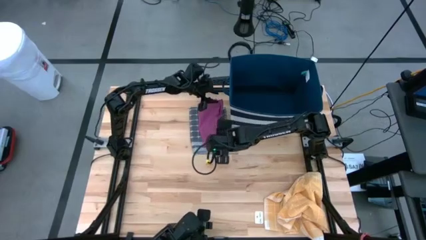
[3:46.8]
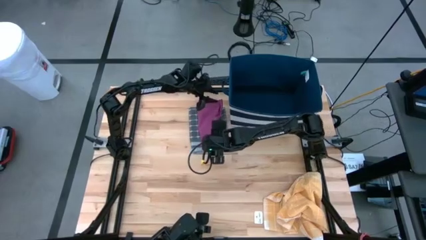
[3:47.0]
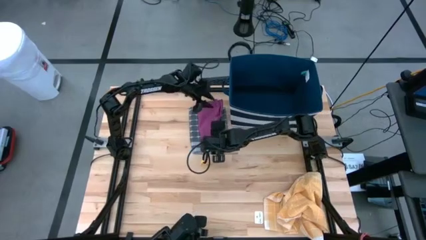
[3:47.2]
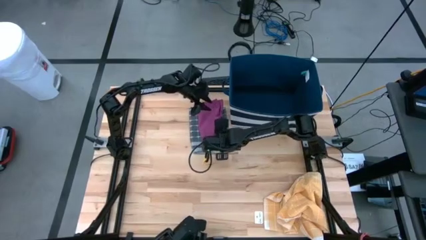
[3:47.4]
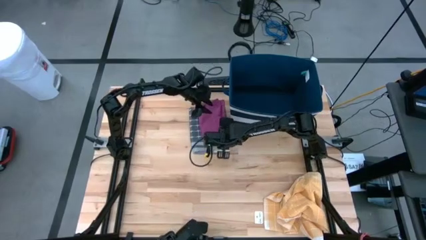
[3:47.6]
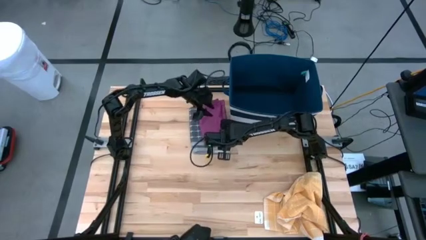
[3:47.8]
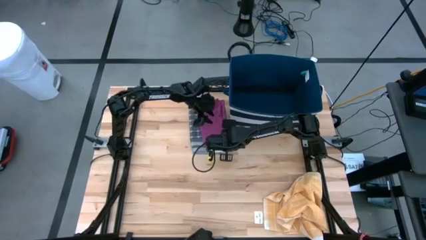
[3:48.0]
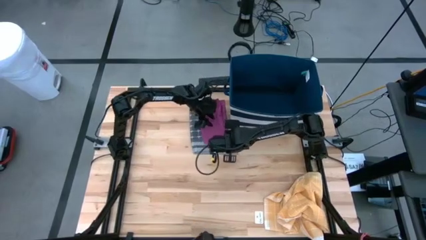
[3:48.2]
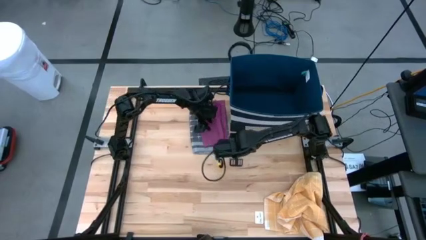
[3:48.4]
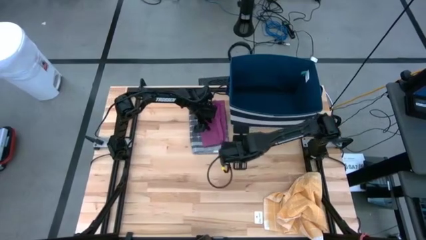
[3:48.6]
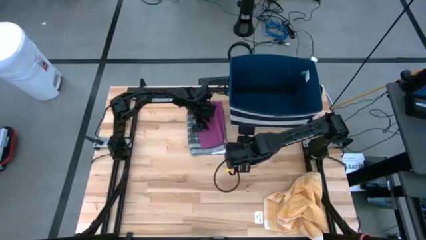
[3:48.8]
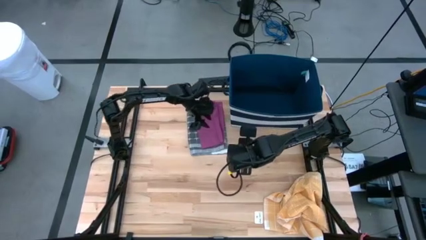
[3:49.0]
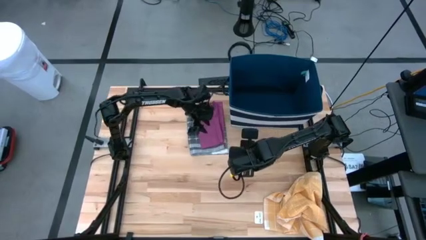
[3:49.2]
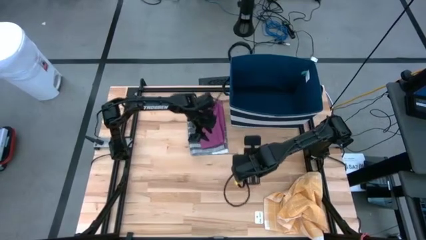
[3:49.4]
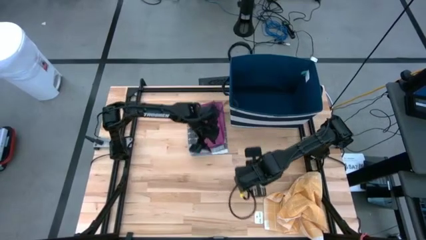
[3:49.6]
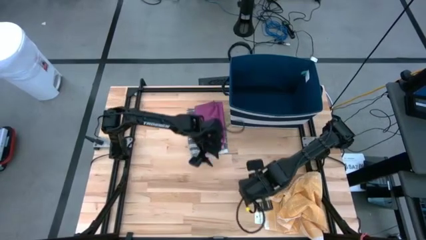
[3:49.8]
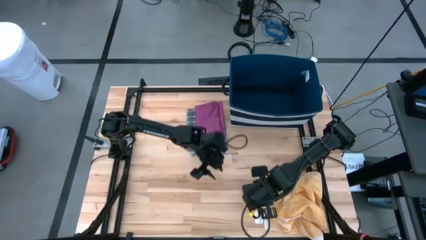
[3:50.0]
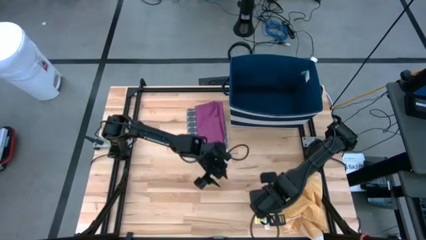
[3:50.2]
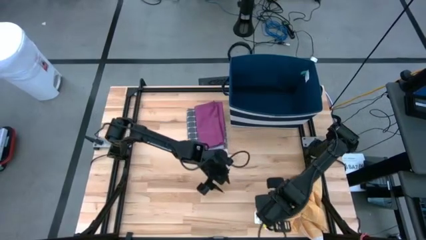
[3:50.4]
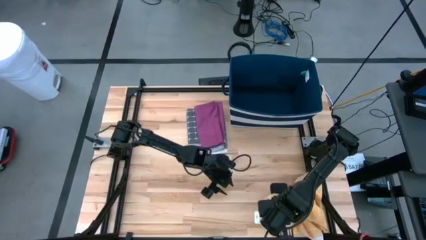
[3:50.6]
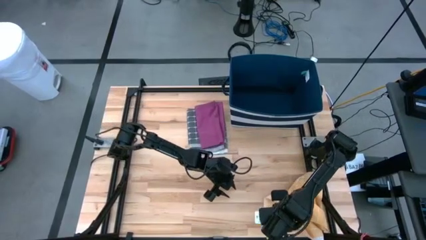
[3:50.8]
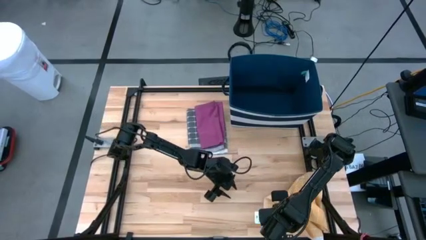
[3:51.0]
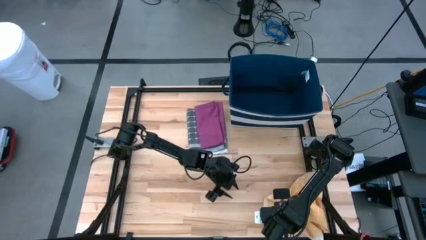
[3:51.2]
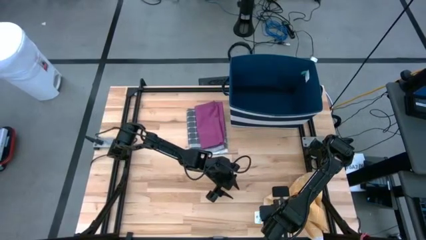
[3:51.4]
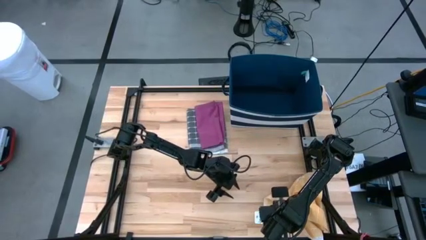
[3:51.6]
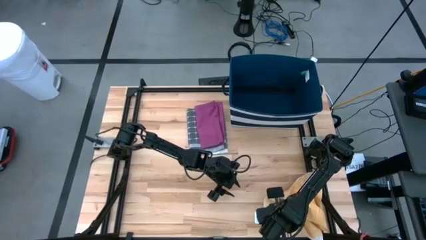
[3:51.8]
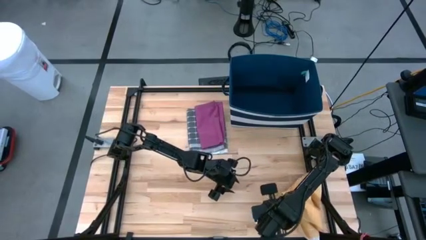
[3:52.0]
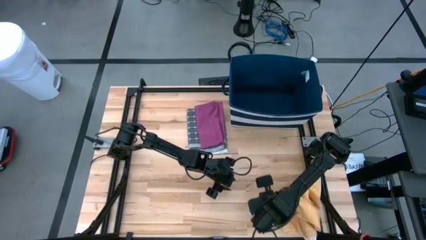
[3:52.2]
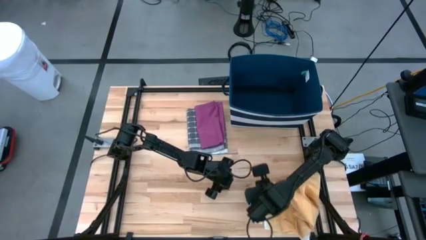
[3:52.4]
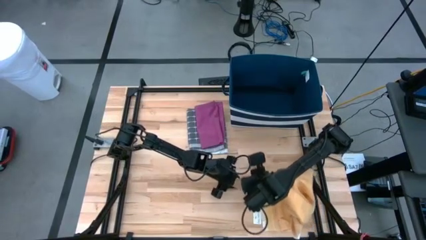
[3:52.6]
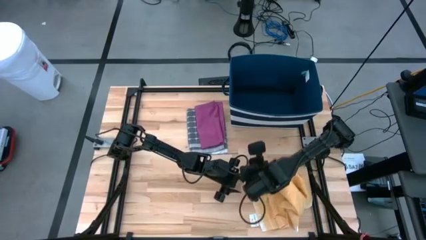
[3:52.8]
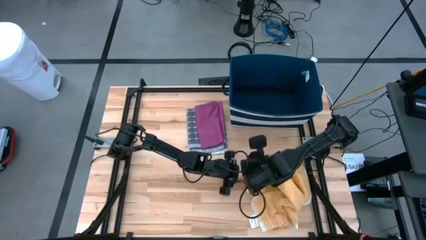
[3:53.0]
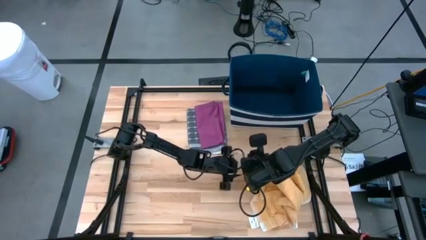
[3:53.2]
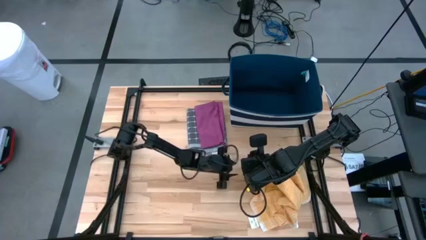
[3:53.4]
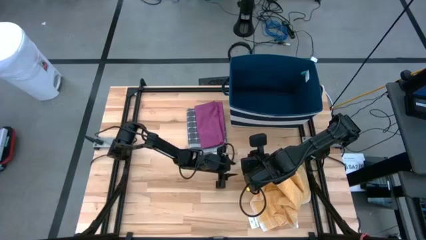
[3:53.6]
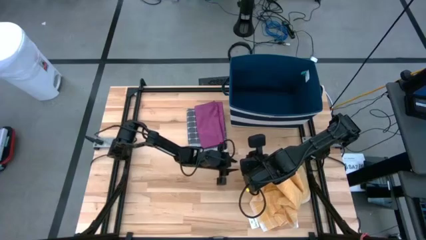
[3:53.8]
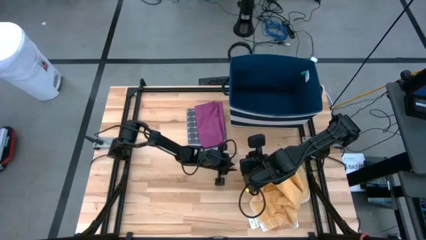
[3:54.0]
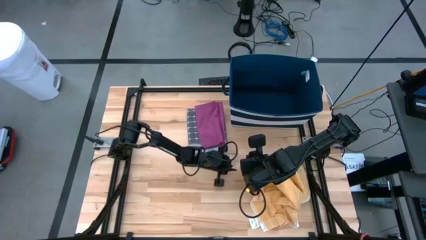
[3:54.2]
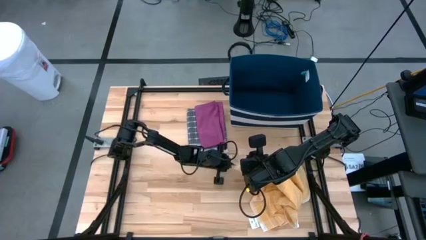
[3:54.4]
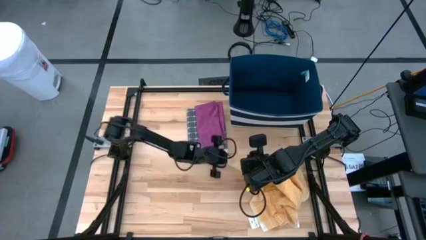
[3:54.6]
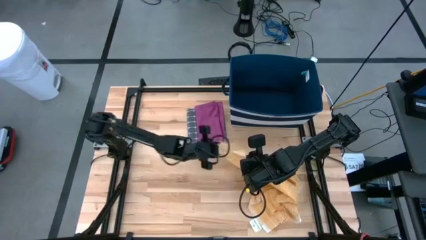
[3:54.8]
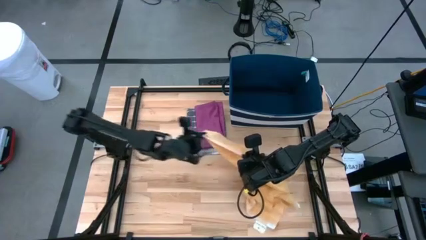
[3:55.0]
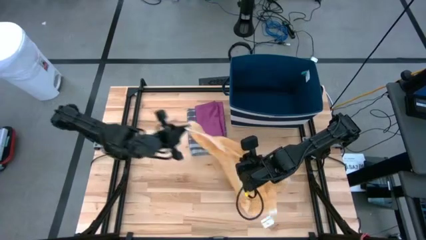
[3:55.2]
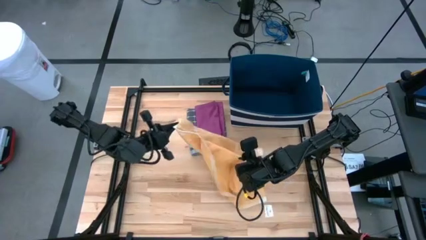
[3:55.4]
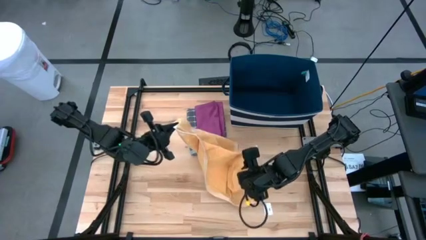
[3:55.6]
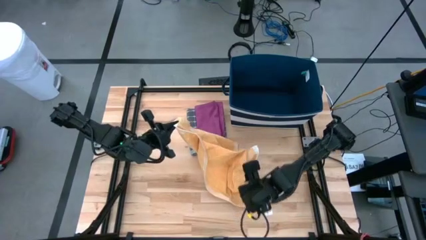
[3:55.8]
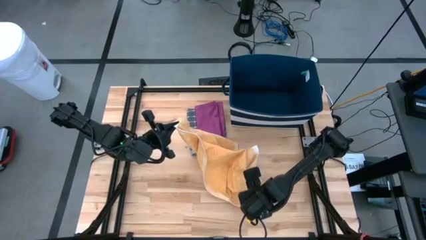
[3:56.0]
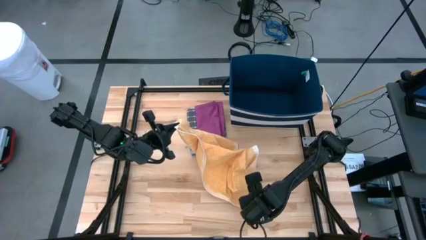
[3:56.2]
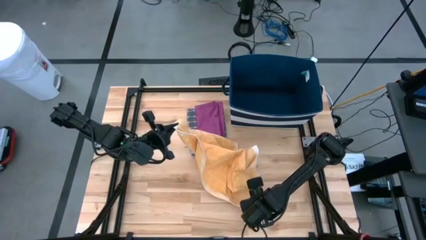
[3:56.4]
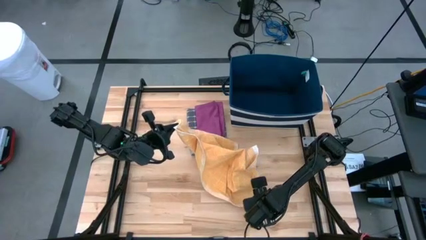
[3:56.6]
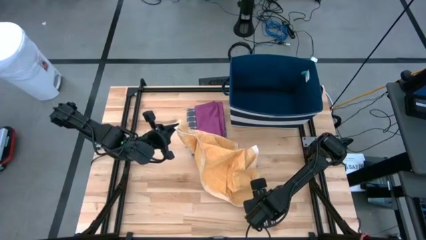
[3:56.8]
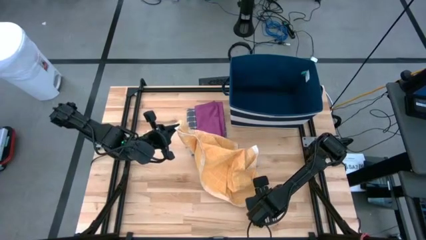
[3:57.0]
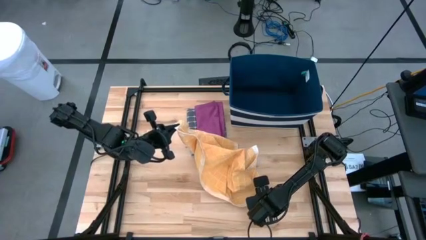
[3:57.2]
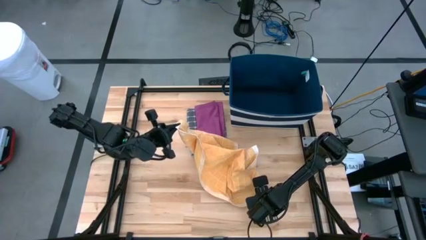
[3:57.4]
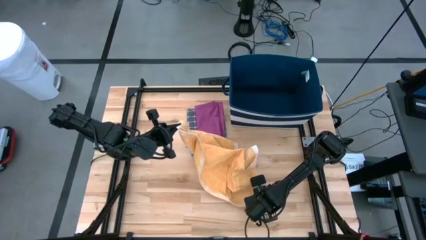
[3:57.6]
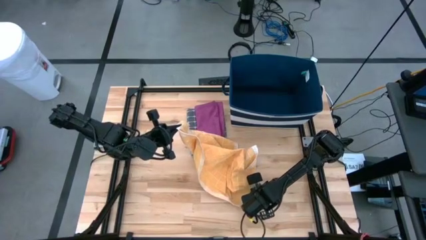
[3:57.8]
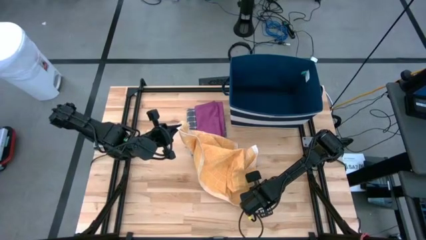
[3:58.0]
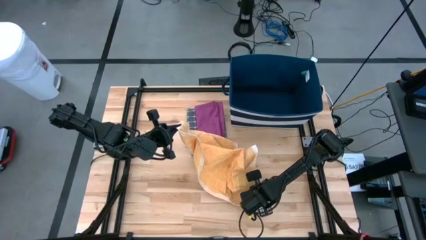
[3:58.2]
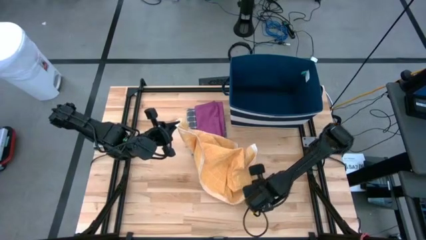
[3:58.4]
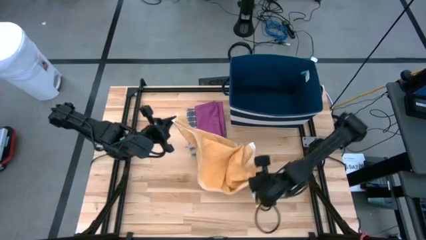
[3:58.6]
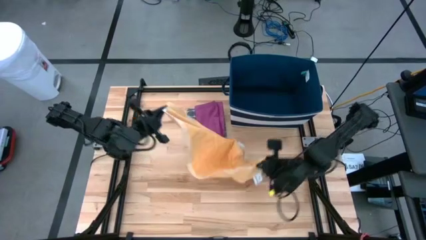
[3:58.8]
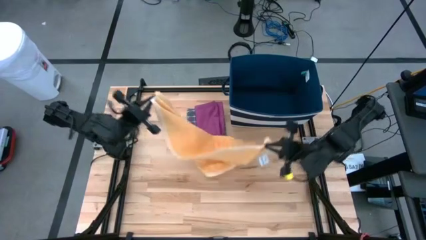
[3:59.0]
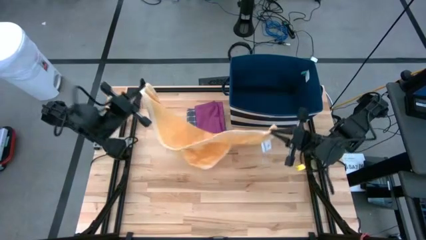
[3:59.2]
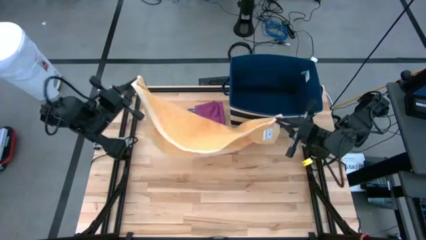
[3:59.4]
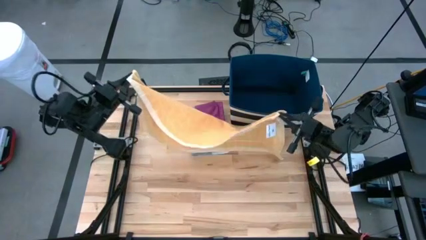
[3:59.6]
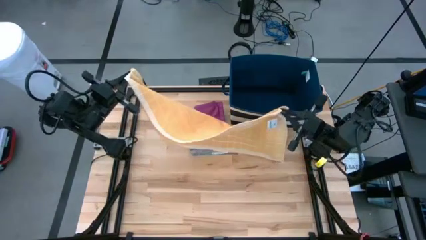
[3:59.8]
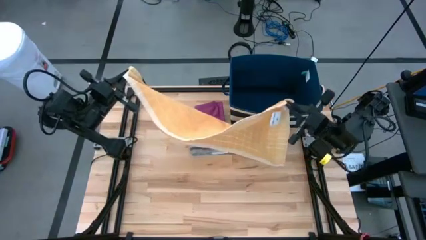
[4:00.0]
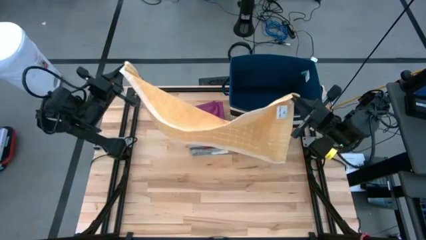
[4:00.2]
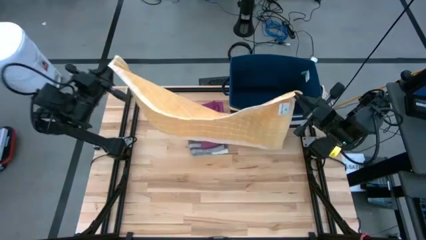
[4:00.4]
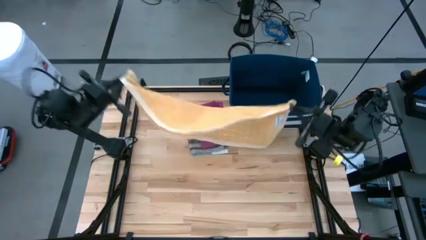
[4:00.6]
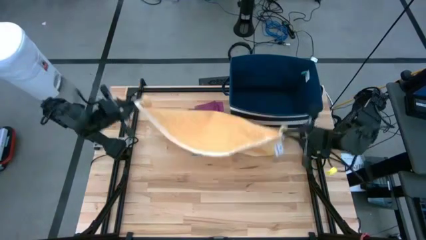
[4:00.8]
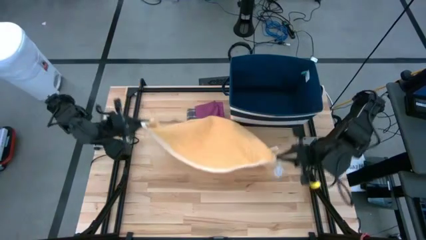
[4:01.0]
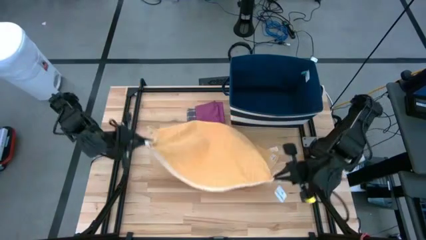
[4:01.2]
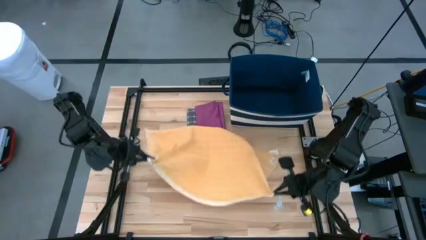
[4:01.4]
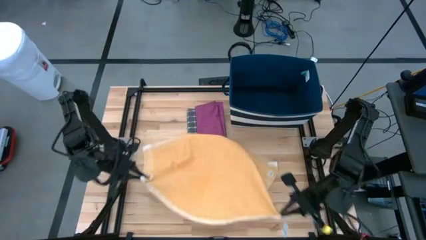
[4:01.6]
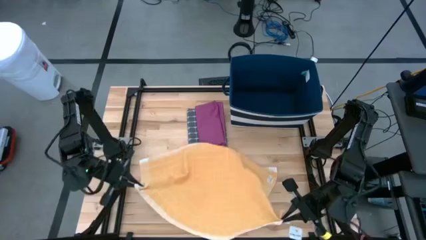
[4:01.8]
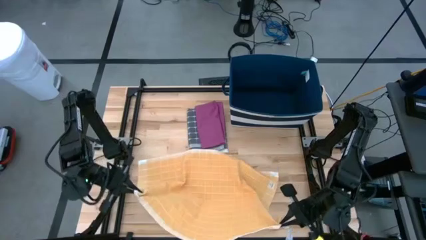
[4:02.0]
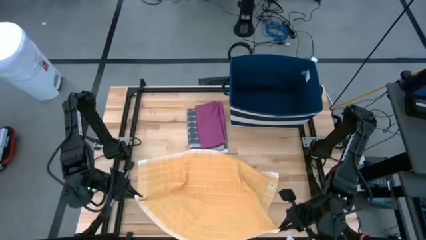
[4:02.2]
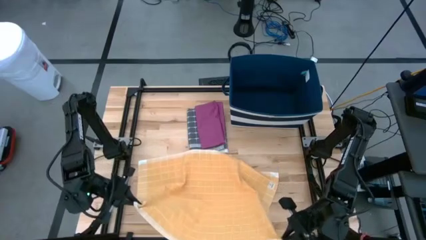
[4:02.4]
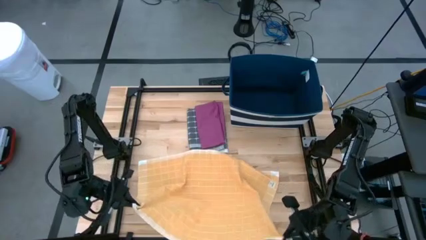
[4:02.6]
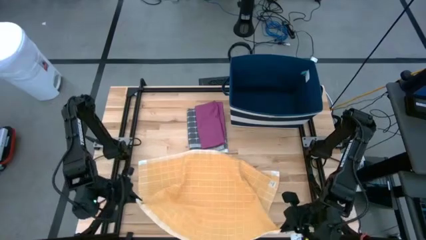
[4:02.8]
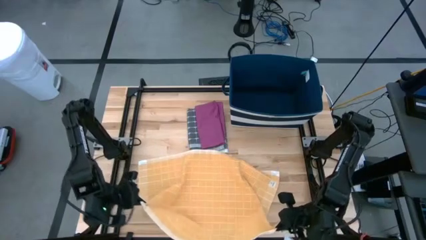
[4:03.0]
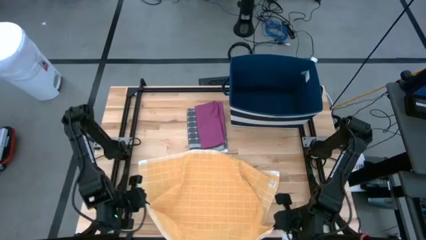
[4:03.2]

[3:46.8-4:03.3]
Task: Fold towel
Fold the orange checkered towel
